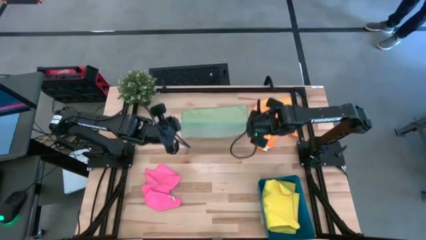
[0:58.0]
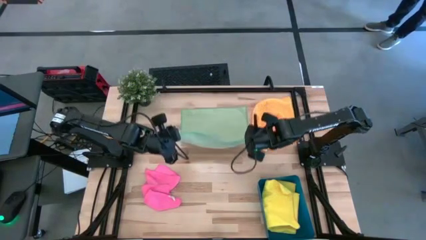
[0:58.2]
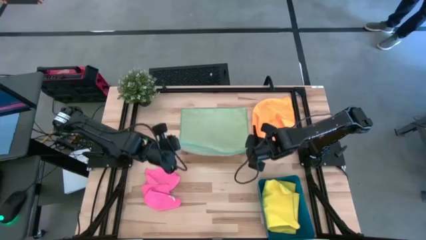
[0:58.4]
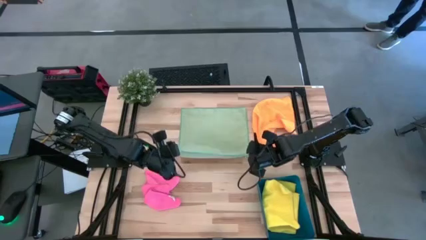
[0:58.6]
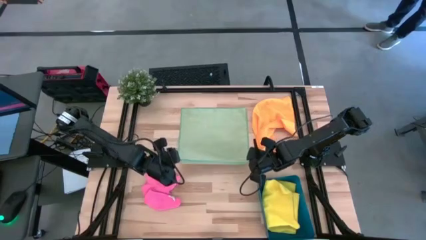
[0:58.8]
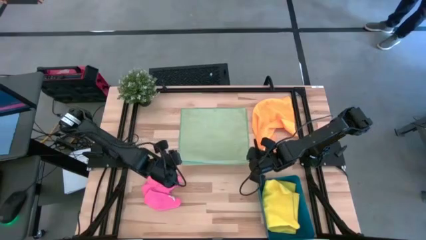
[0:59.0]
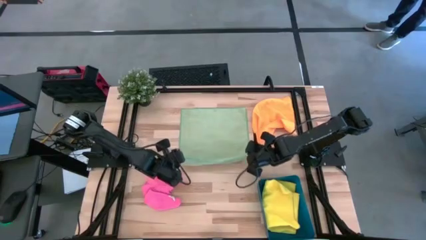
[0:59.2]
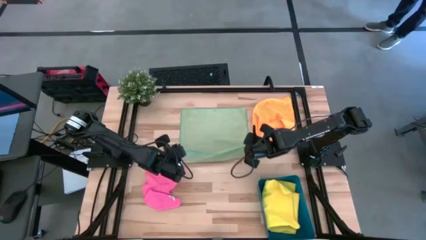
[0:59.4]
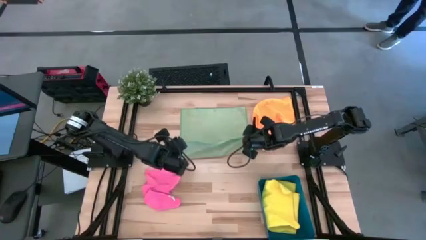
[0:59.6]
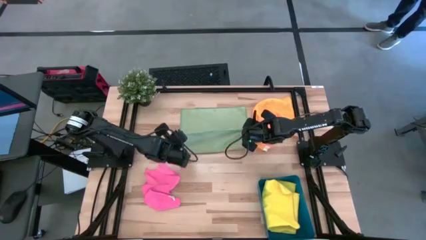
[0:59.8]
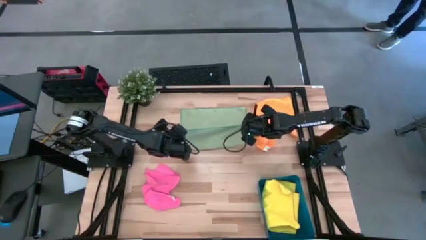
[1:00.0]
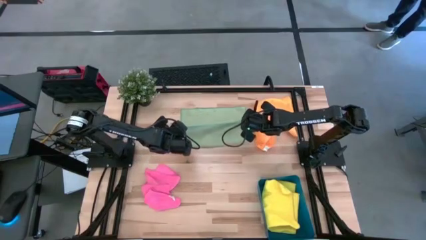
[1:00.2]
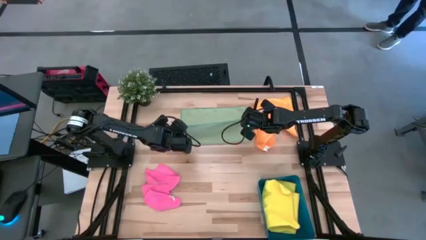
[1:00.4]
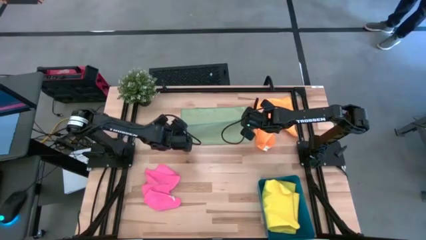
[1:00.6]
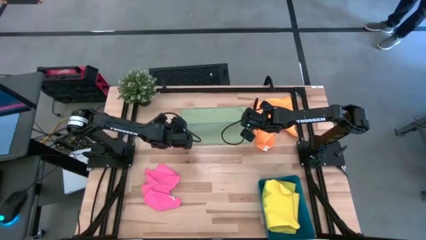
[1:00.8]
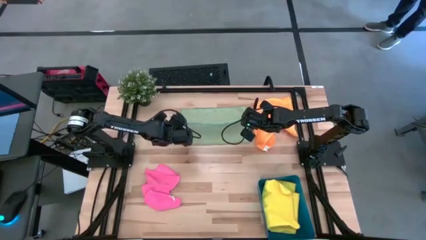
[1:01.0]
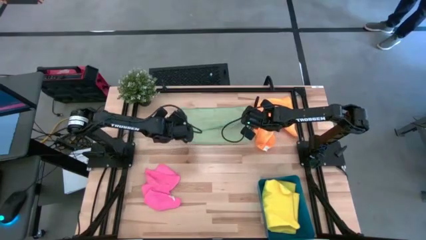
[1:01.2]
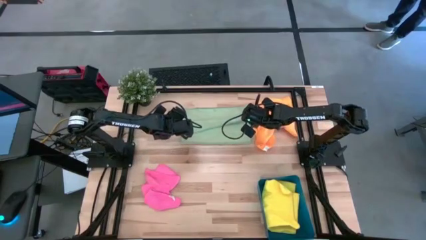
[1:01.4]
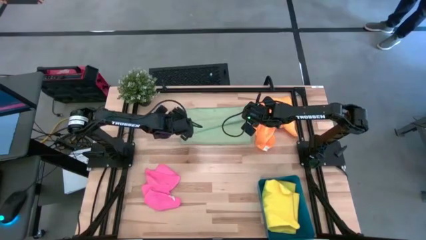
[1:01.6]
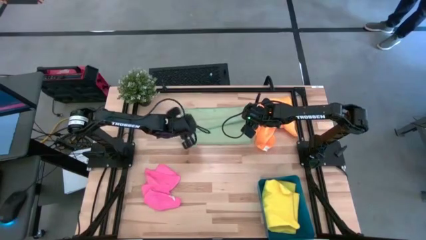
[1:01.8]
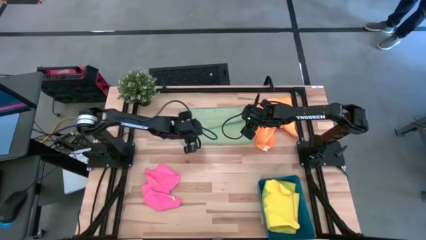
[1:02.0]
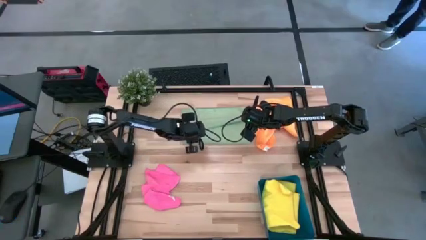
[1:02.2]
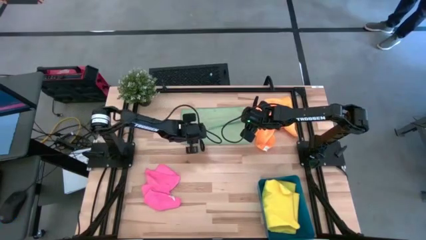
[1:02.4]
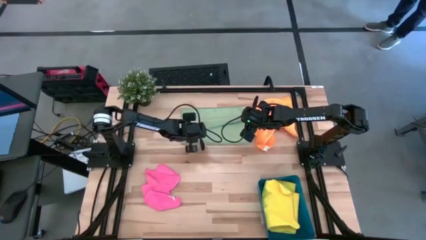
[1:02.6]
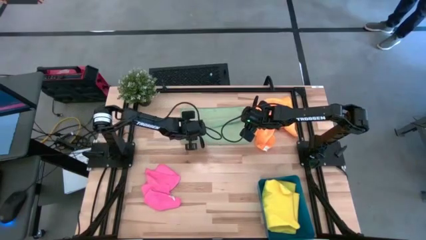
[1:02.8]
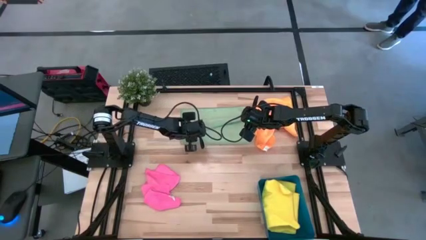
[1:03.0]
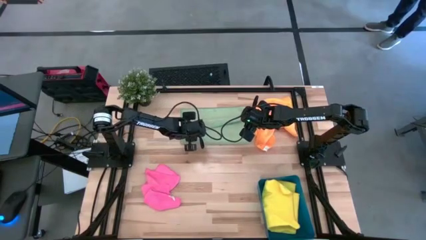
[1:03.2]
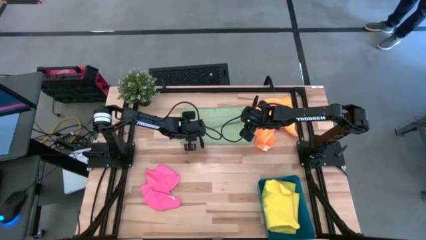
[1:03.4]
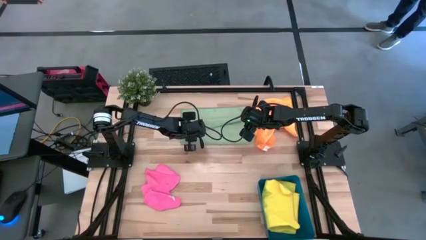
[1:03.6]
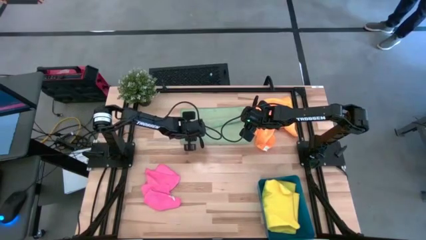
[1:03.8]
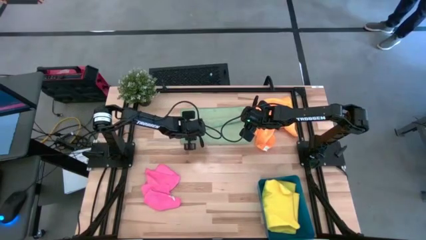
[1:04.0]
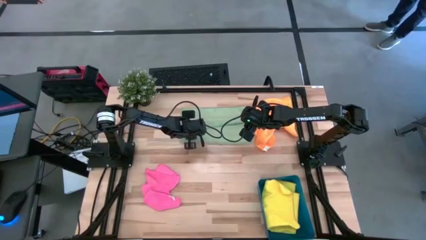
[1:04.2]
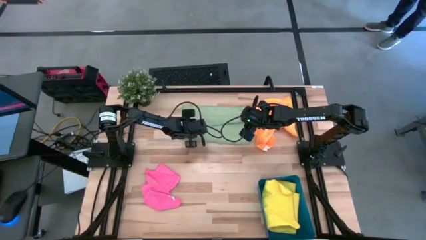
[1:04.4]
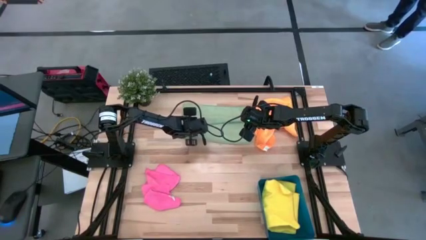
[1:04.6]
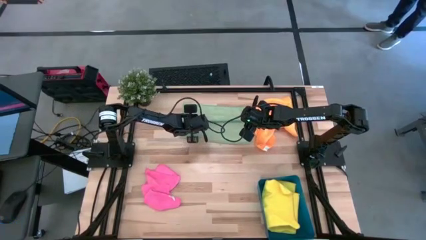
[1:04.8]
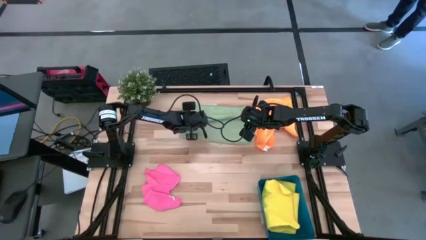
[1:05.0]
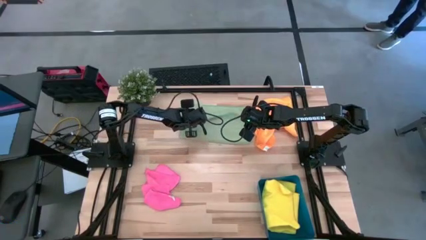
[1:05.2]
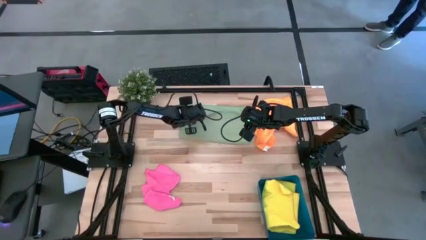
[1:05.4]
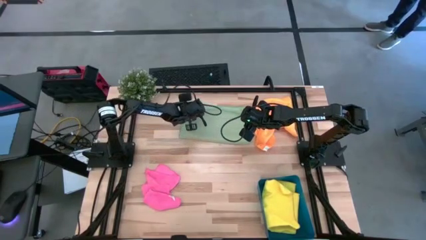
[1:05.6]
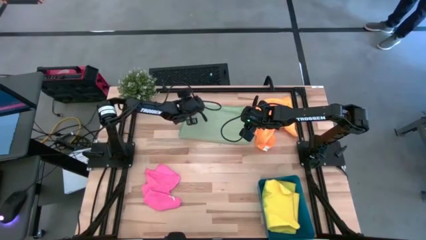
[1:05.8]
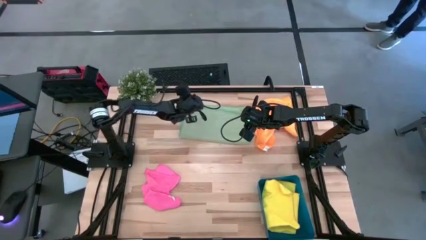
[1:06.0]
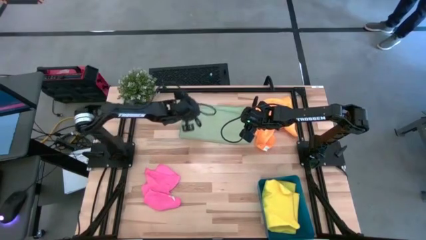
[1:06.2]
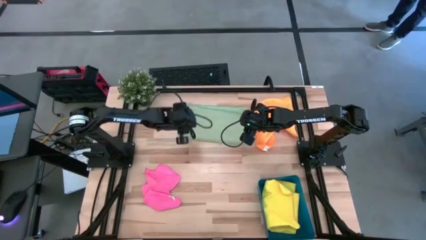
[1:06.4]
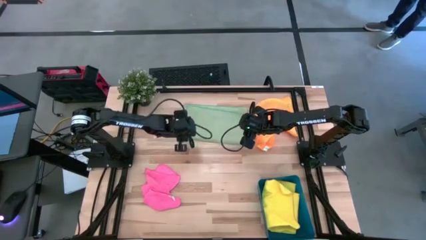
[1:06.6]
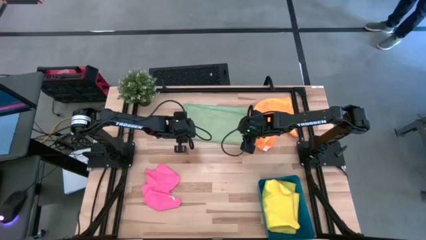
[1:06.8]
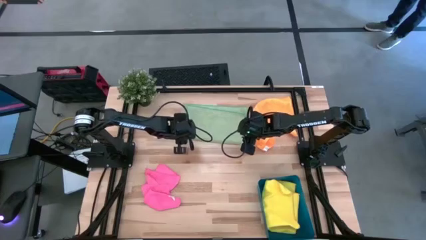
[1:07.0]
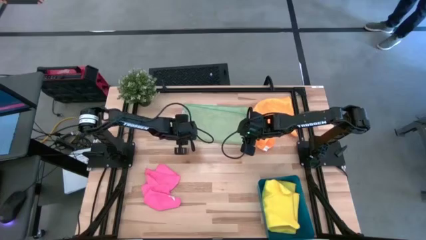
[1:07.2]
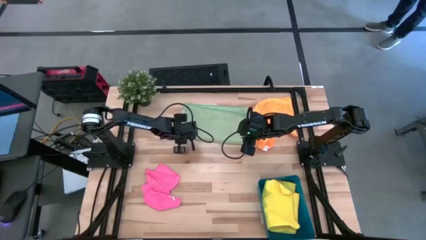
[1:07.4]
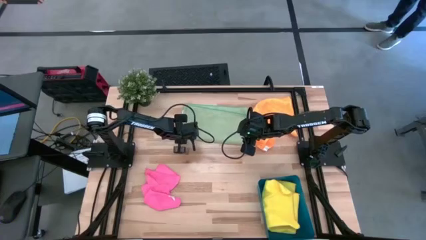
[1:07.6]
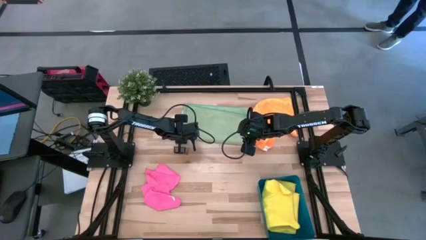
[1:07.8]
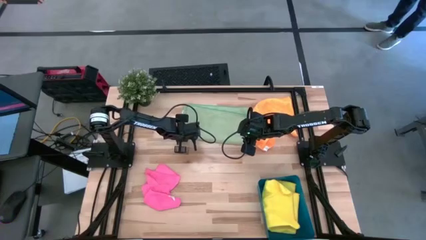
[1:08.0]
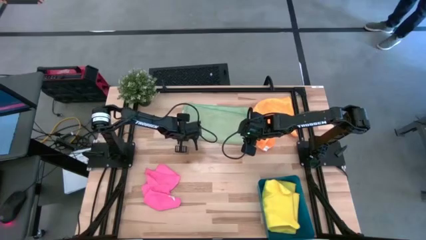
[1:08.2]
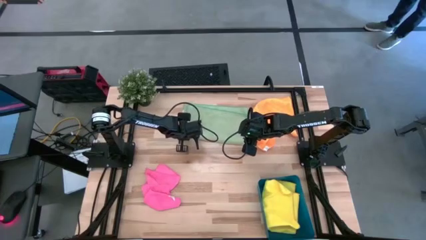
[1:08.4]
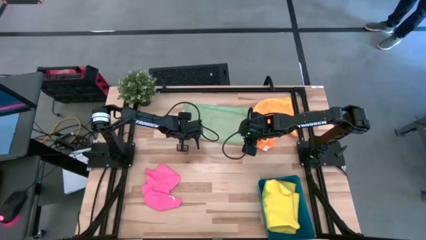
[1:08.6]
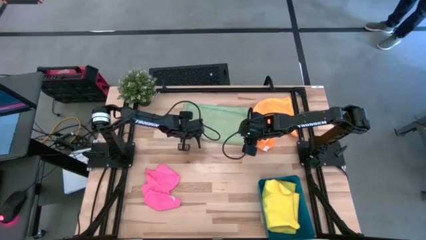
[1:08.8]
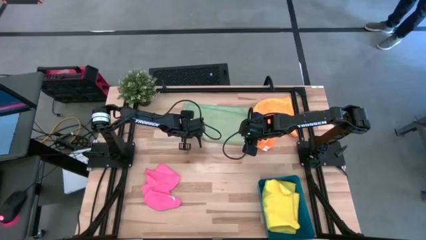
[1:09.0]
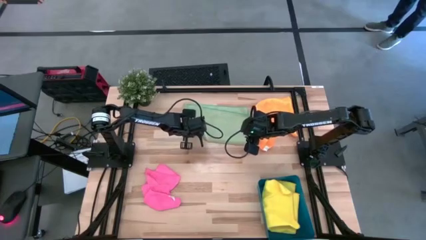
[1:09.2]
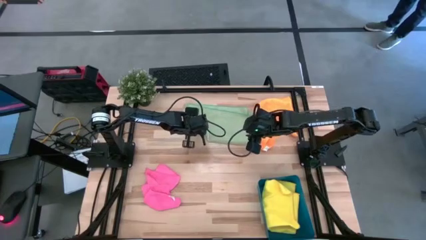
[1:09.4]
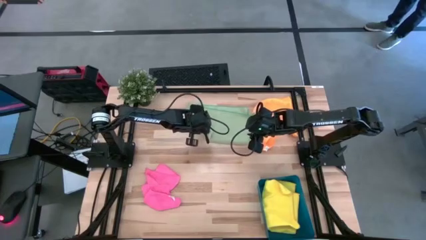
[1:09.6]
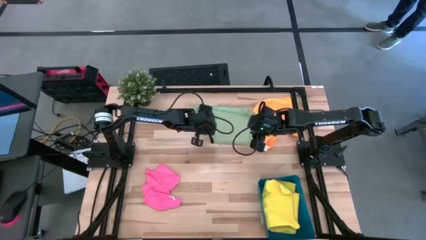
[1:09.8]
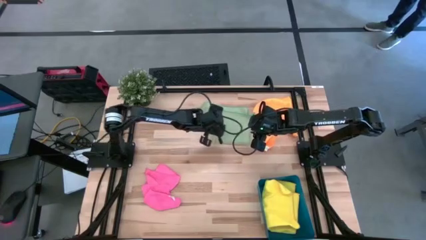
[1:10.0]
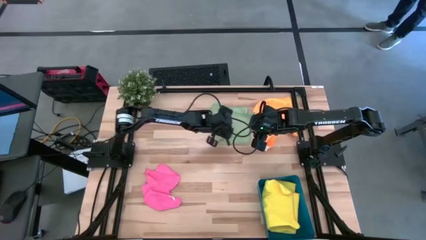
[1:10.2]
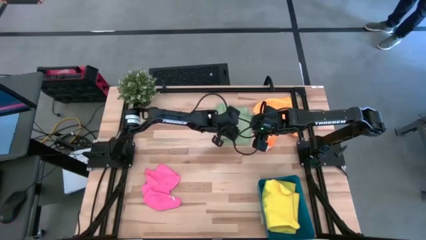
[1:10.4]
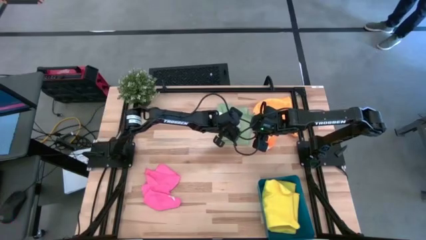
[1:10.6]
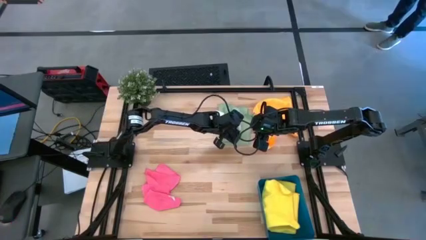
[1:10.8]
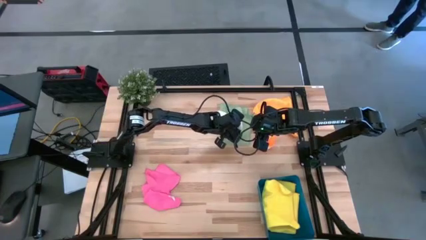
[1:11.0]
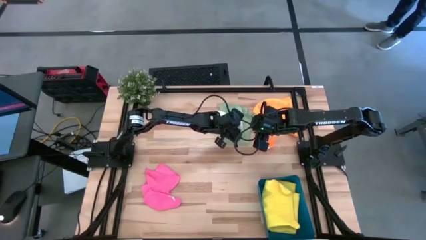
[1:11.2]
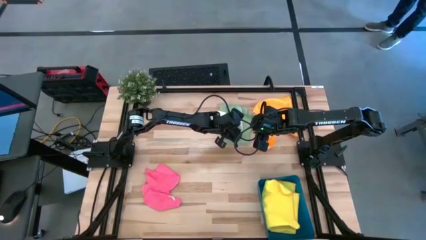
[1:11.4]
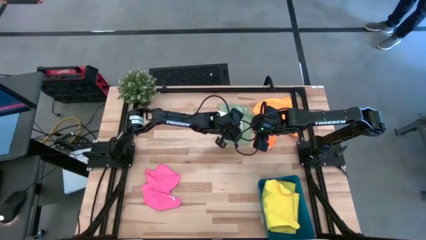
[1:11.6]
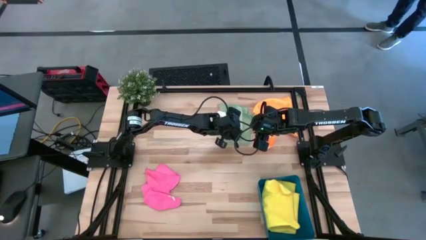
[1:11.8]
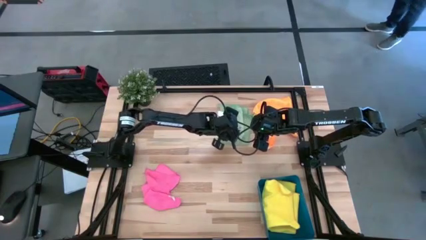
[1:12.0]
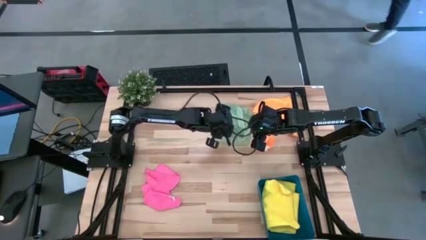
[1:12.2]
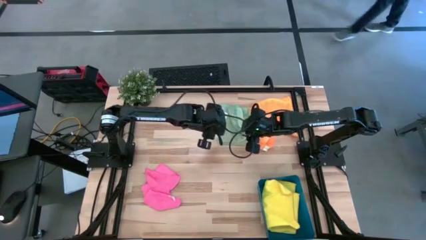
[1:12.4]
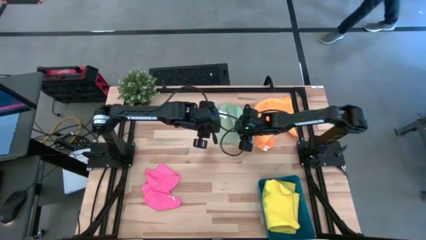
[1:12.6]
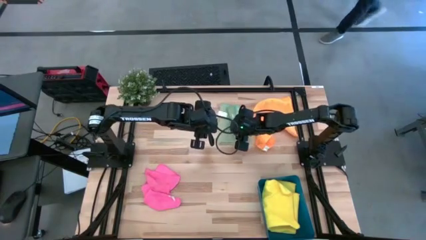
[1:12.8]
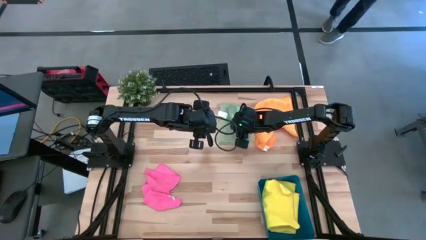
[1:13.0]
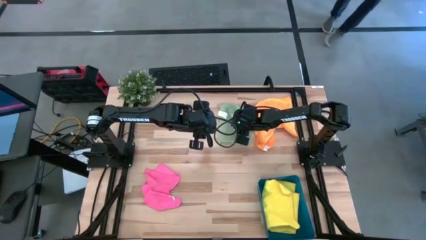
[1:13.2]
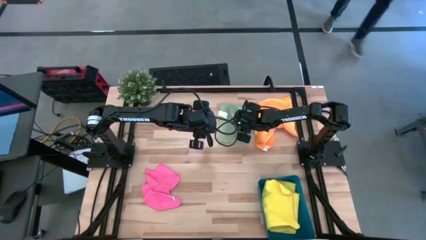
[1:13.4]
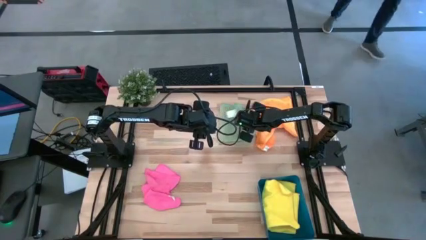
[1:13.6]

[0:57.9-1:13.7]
Task: Fold microfiber towels
Fold the green microfiber towel
